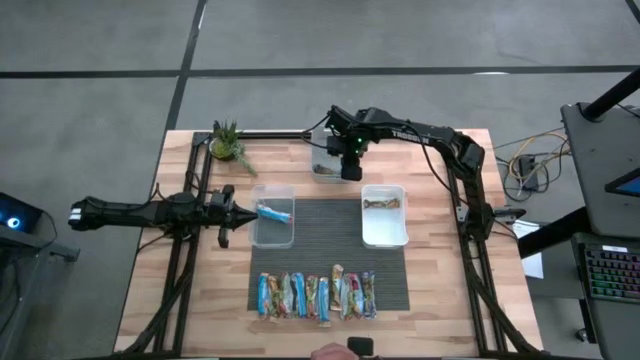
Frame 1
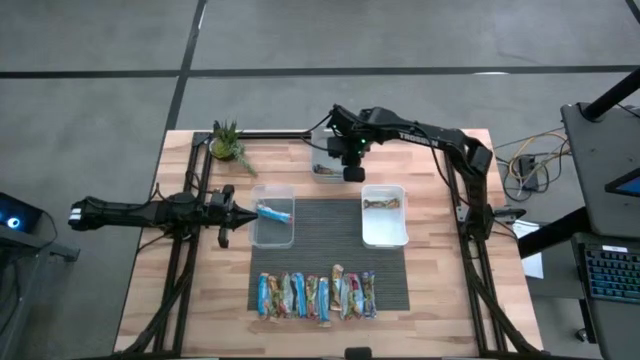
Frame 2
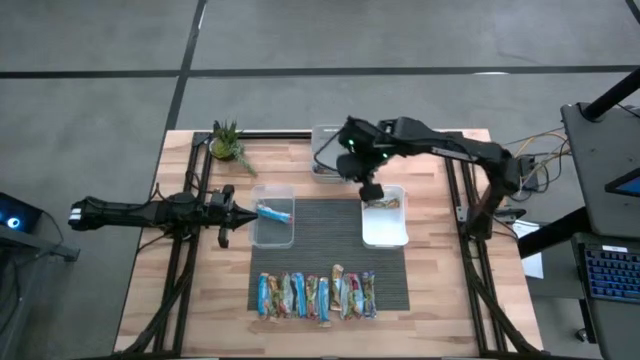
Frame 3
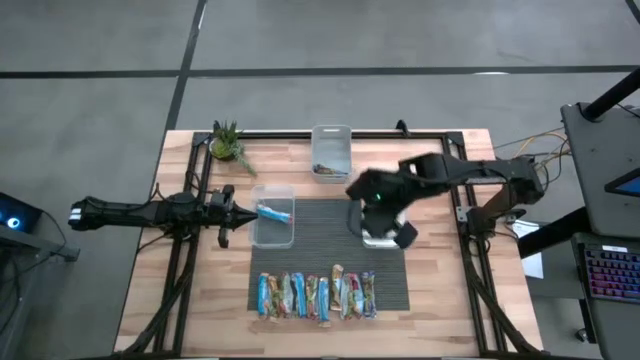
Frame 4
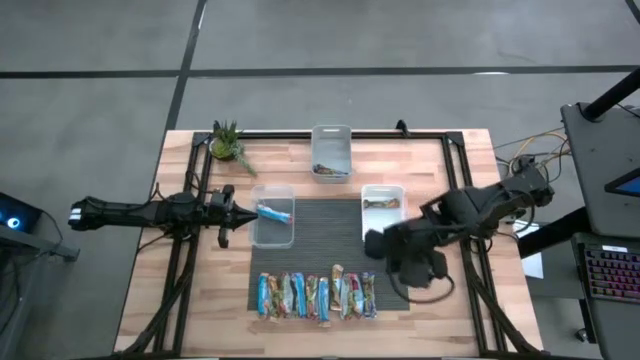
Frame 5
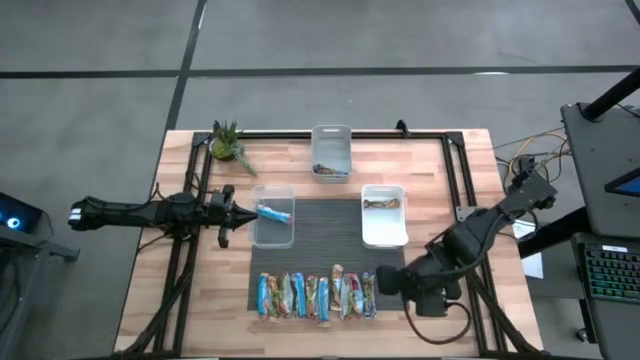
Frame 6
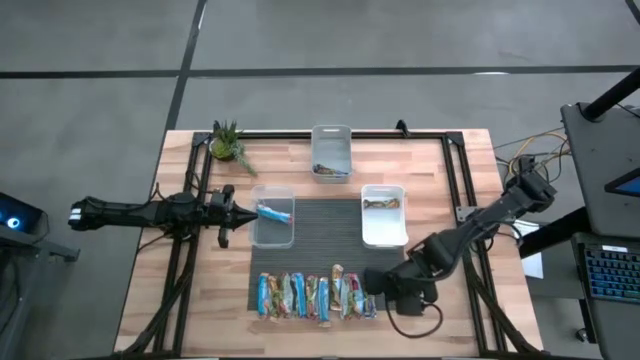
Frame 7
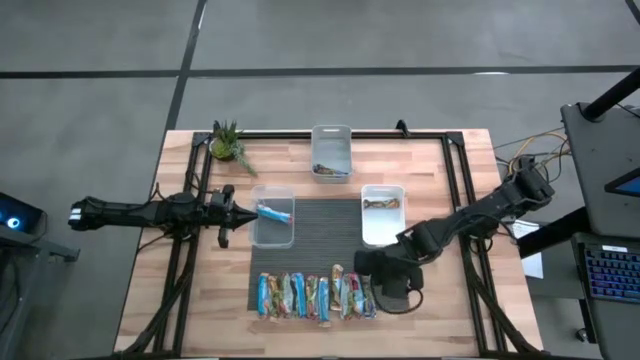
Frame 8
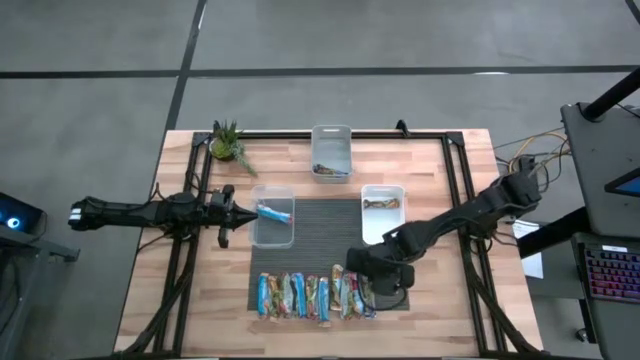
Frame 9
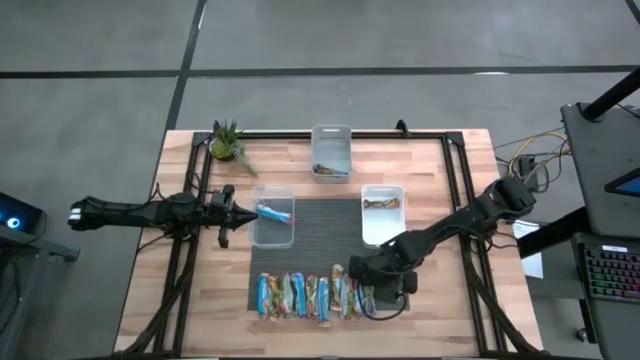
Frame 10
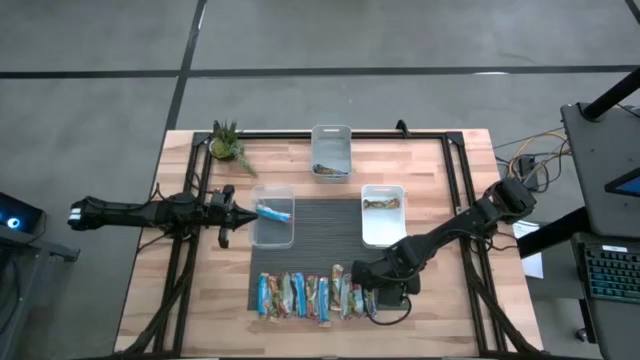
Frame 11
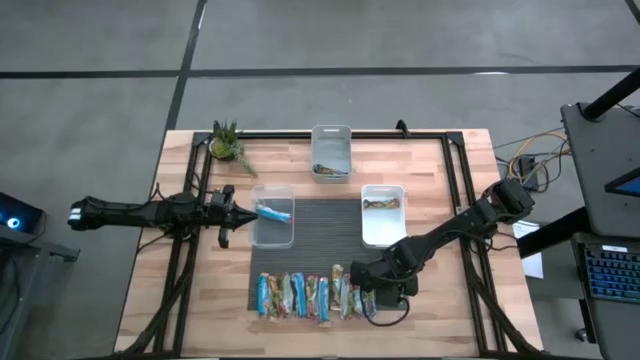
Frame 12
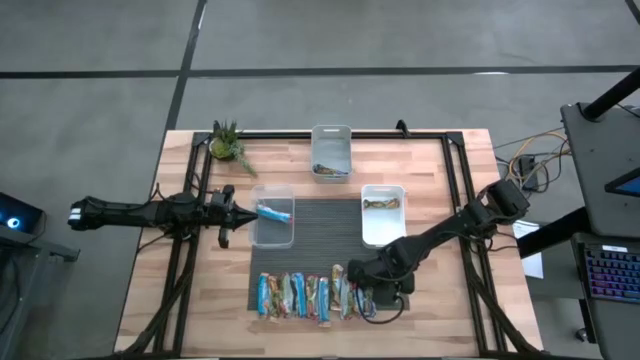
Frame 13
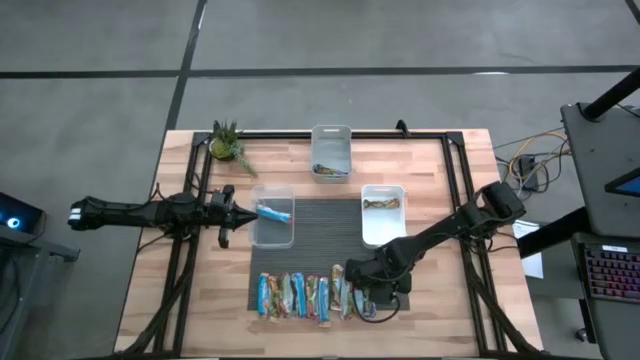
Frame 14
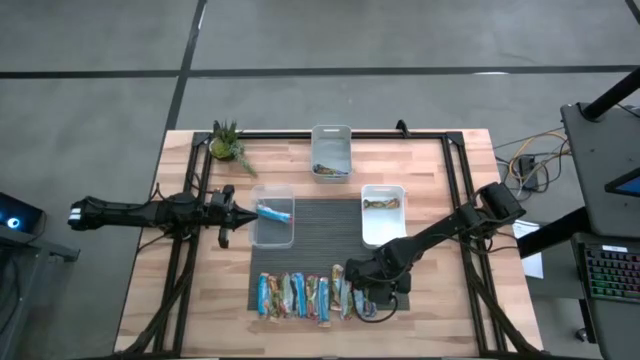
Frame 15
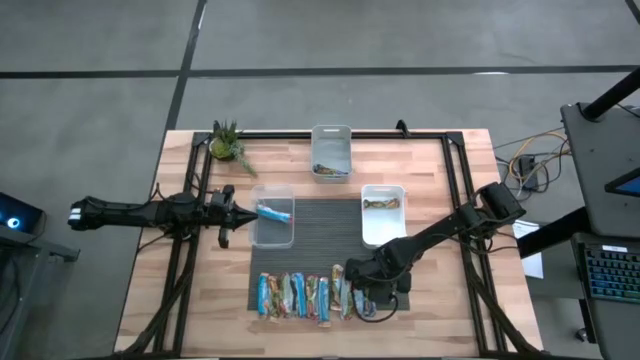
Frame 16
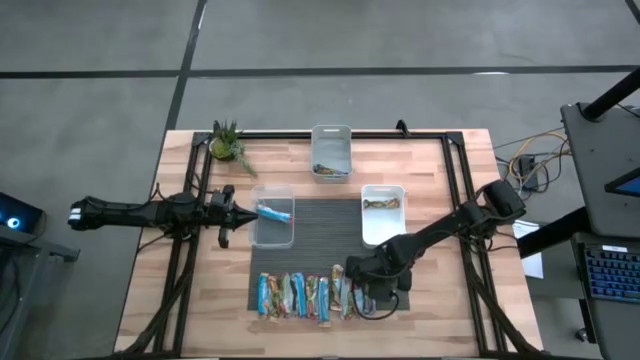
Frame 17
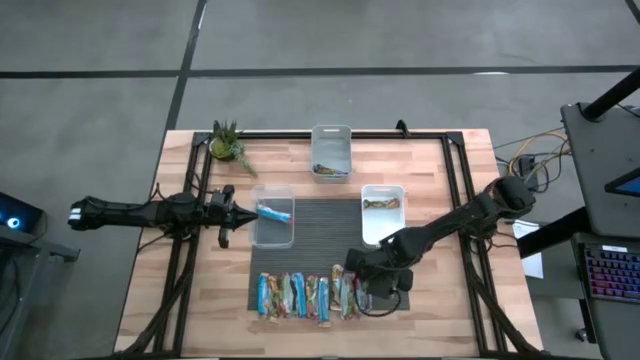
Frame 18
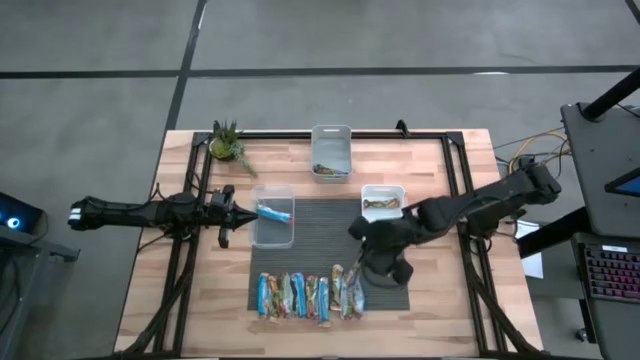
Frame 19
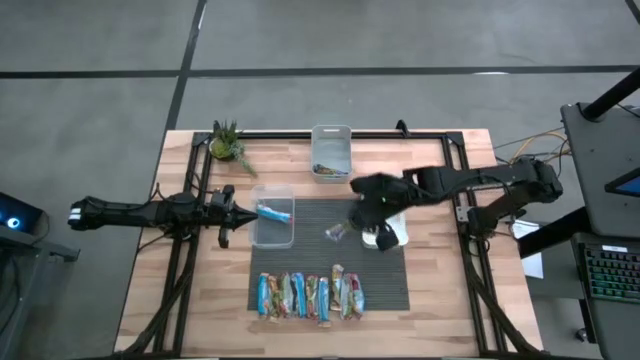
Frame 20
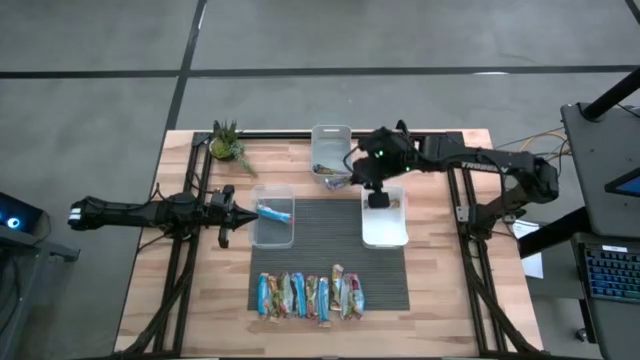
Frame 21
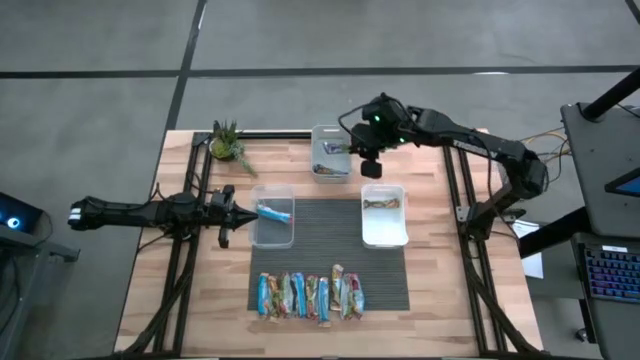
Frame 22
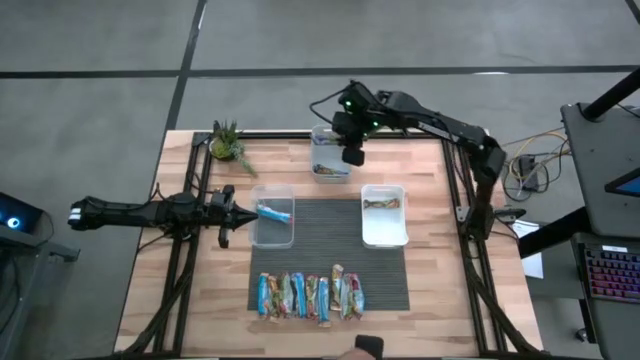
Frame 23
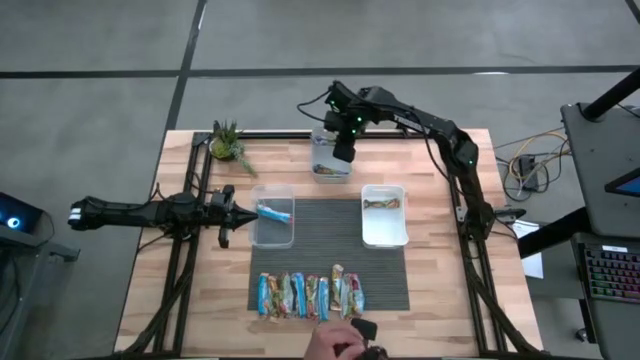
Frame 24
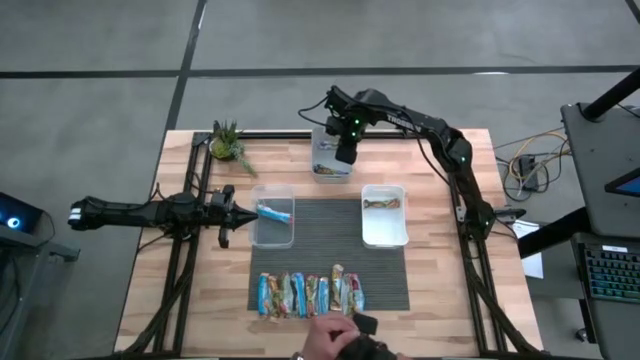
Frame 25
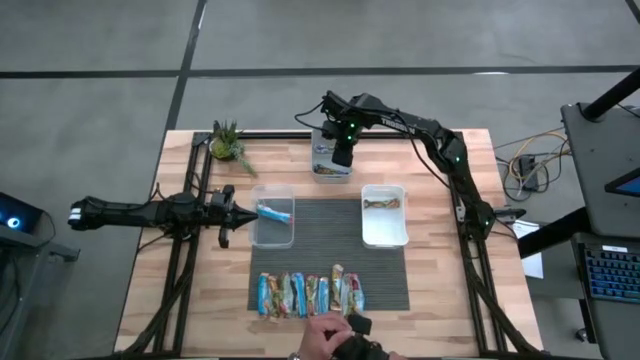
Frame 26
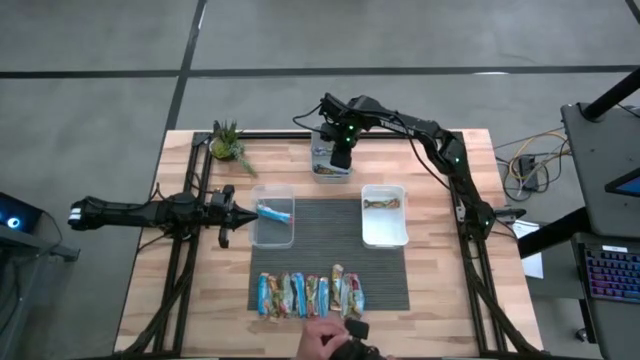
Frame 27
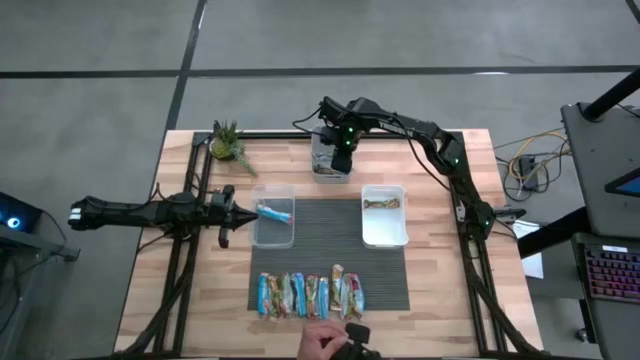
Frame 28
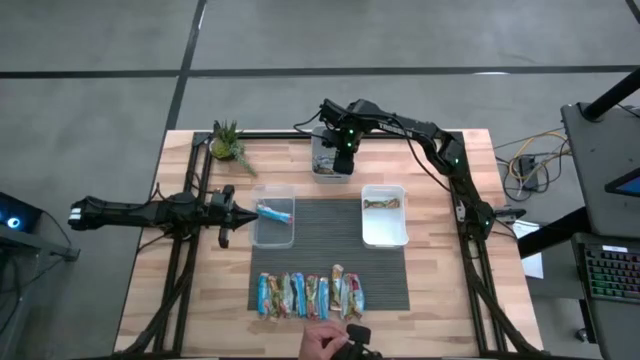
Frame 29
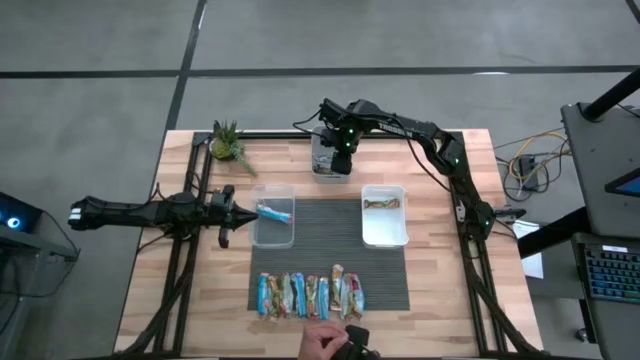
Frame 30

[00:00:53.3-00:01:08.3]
Task: Pick and place Granola Bars by type
Put the blue granola bar into the gray bin

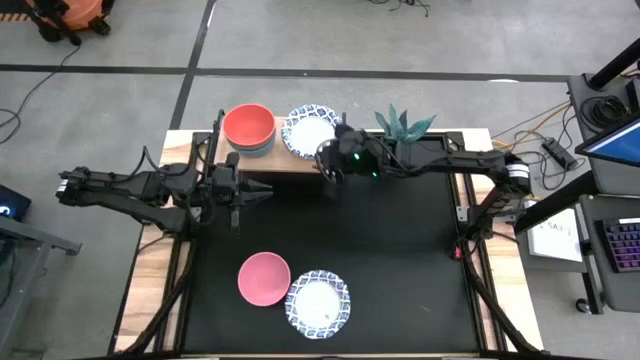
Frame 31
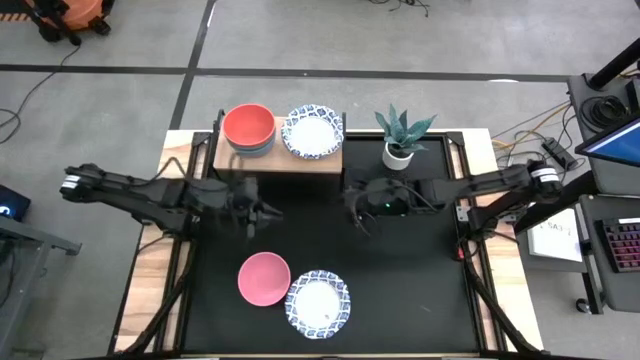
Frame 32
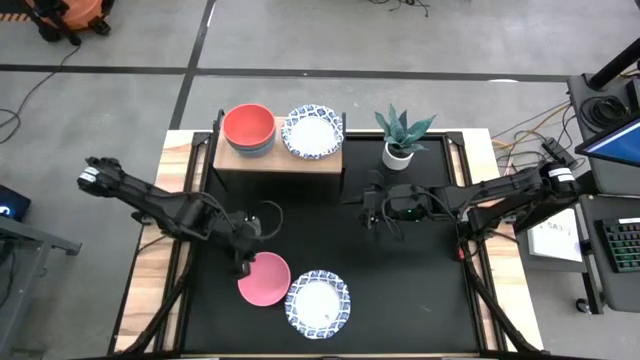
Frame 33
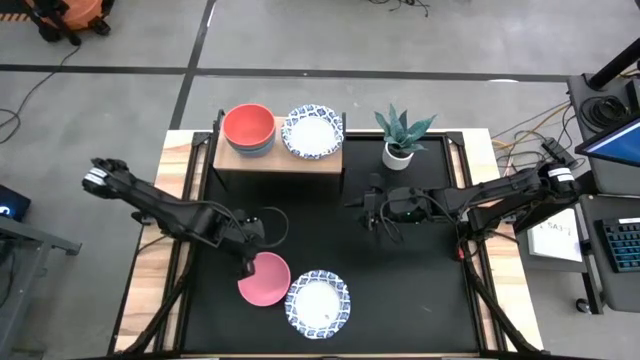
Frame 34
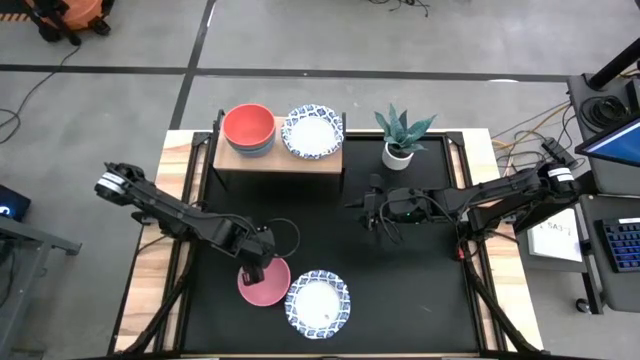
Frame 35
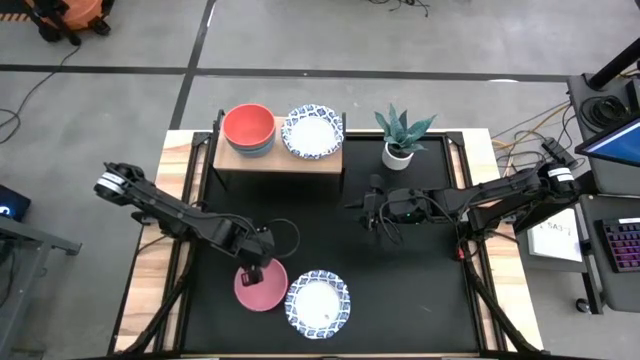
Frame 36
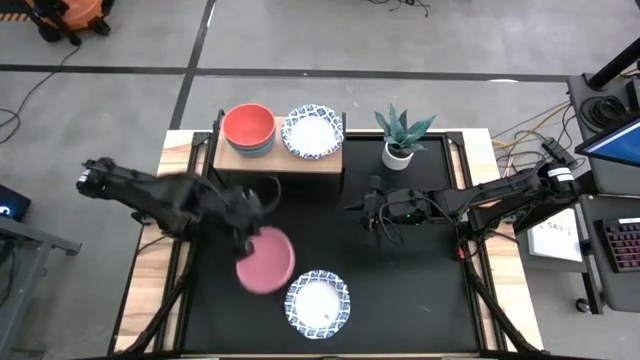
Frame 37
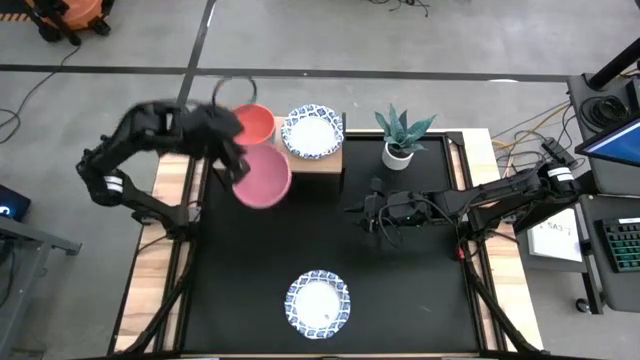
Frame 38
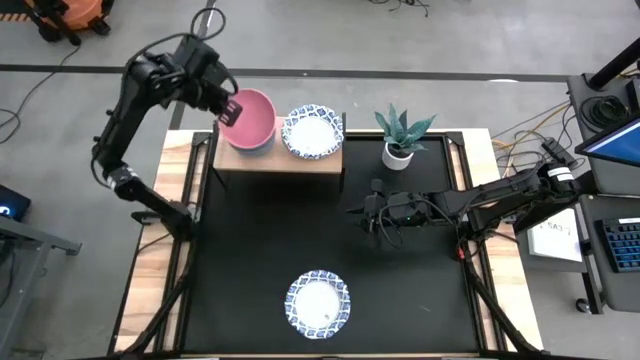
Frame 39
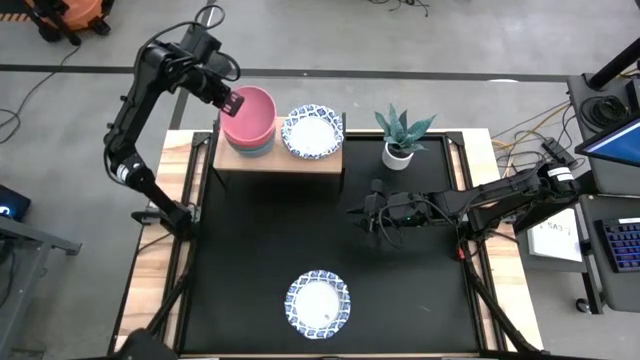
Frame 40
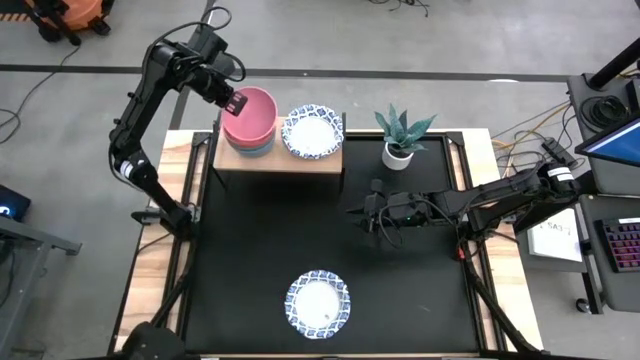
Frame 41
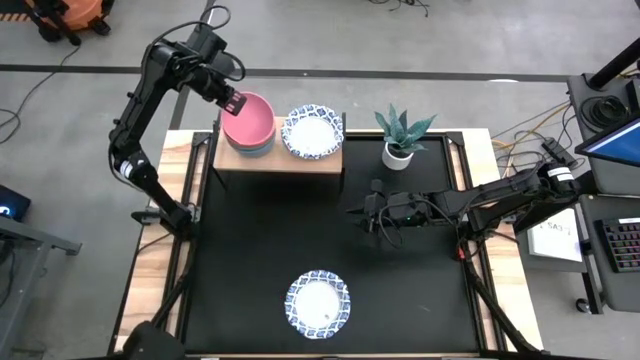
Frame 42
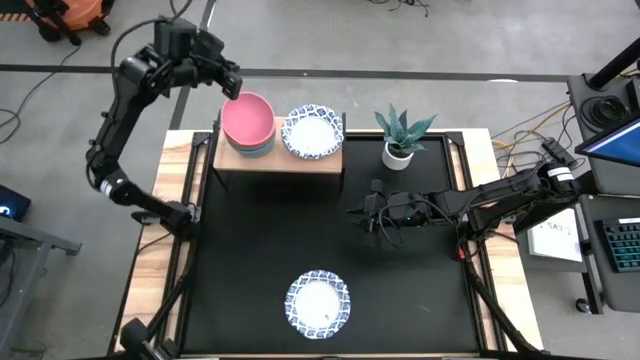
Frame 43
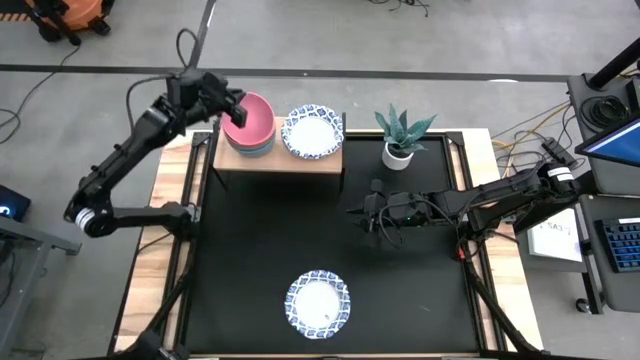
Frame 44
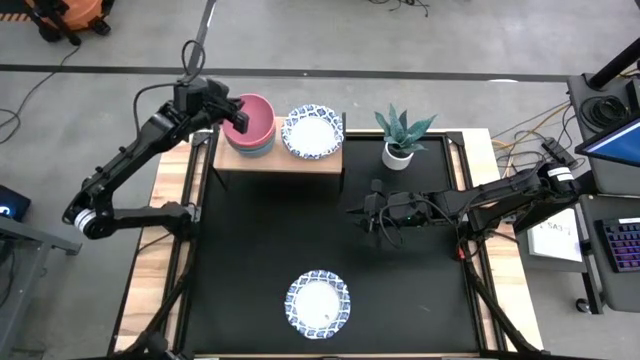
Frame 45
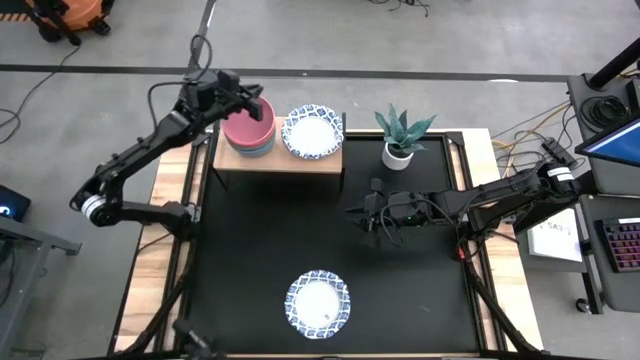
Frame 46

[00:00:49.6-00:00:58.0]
Task: Place and stack bowls onto a shelf
Stack the pink bowl on top of the orange bowl on the shelf
